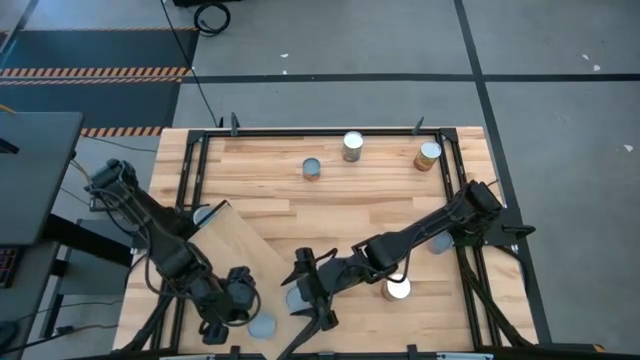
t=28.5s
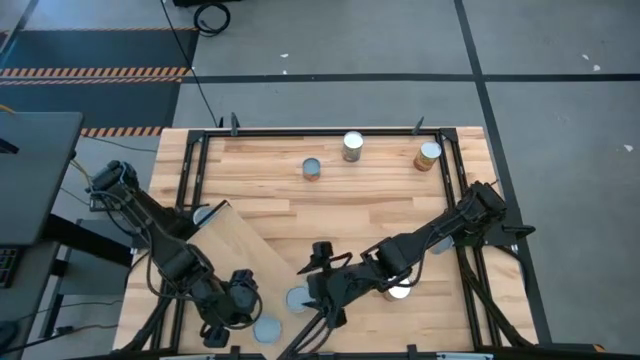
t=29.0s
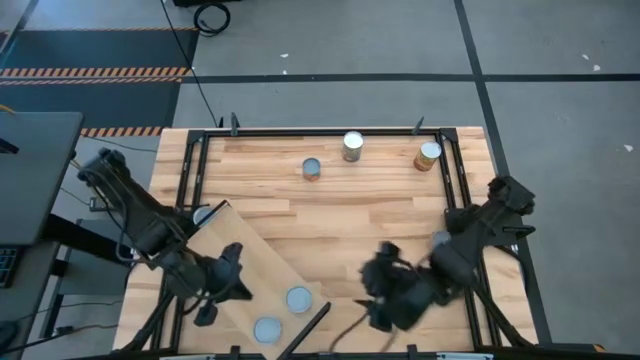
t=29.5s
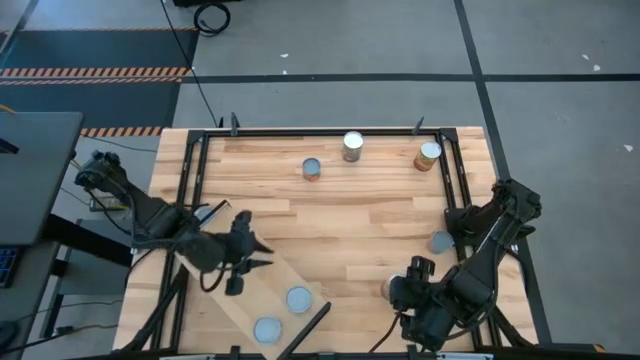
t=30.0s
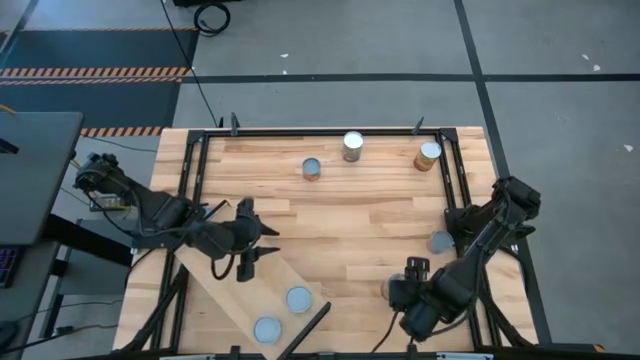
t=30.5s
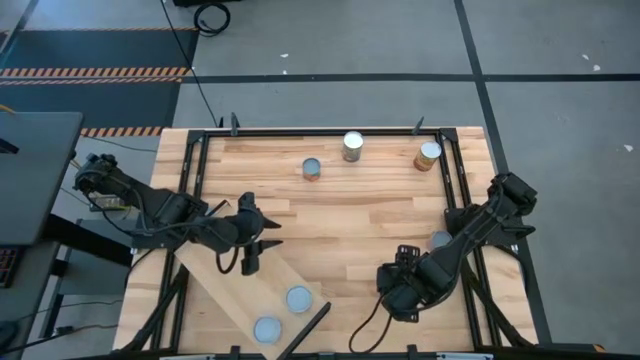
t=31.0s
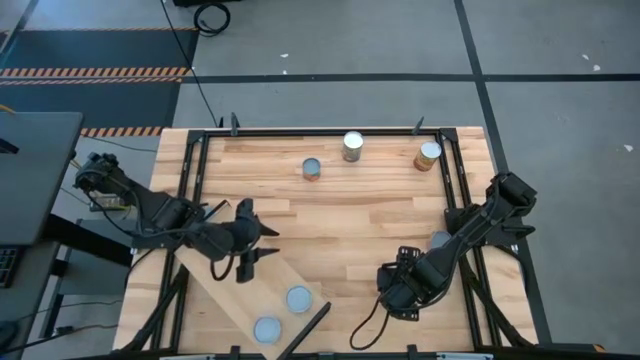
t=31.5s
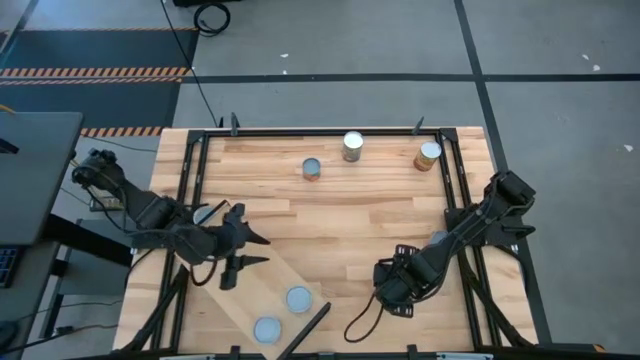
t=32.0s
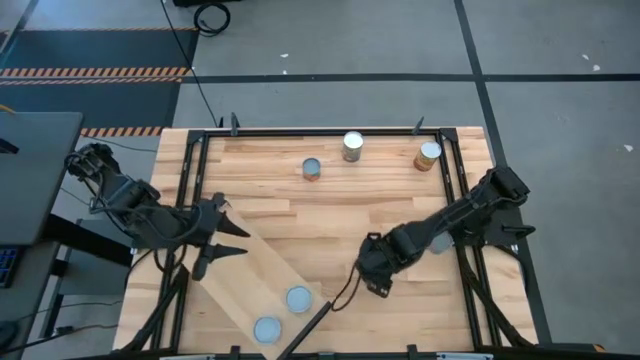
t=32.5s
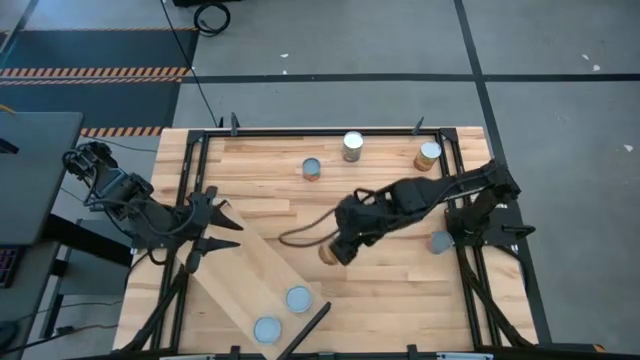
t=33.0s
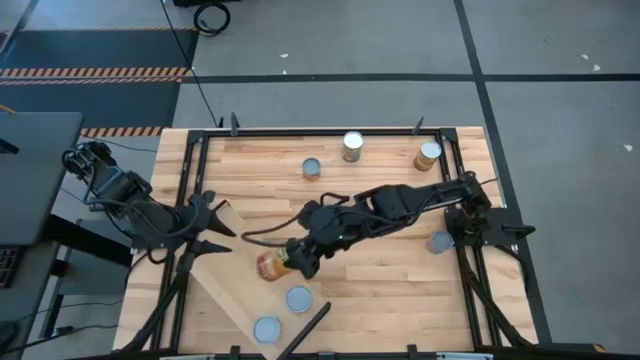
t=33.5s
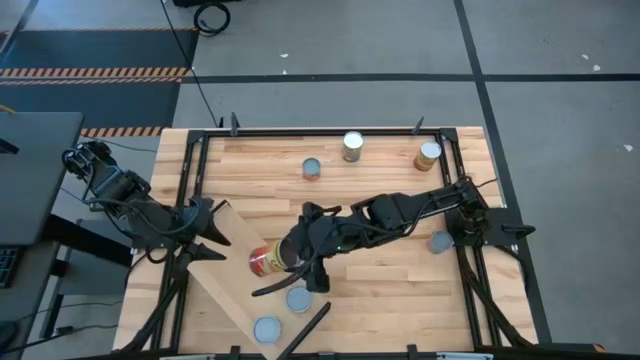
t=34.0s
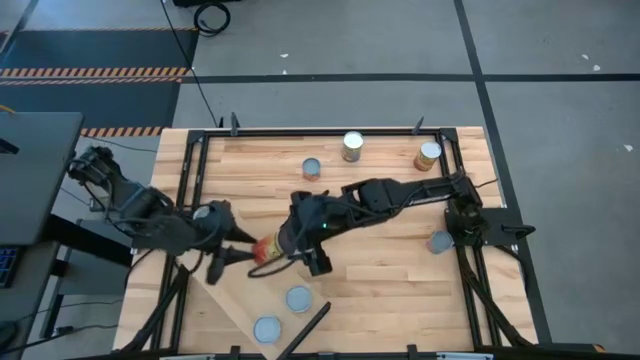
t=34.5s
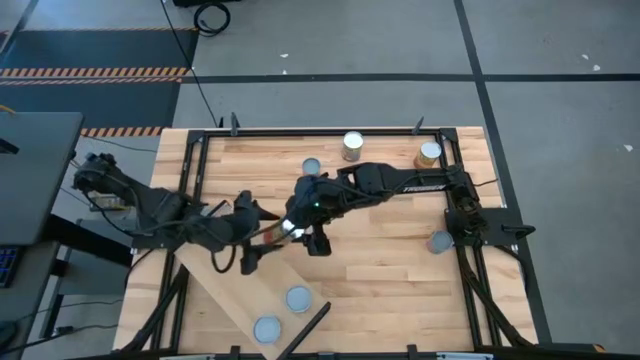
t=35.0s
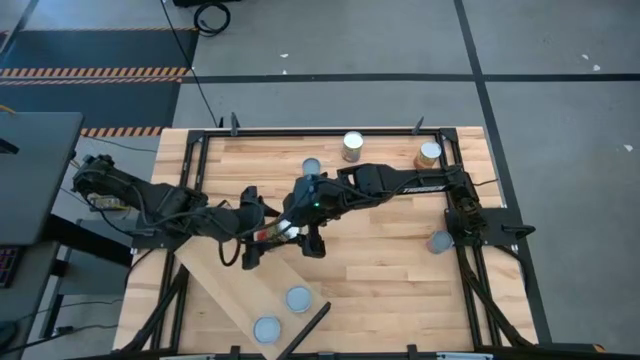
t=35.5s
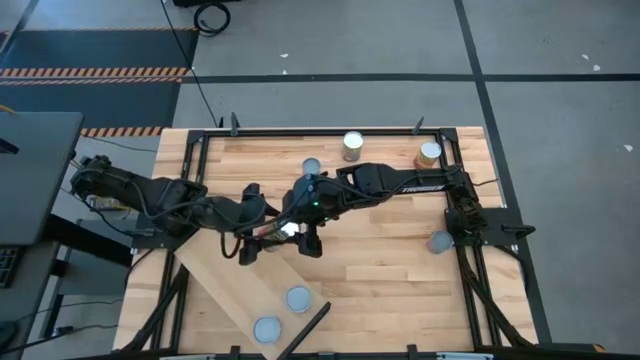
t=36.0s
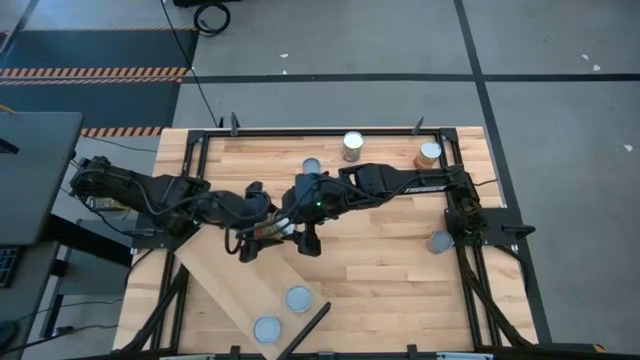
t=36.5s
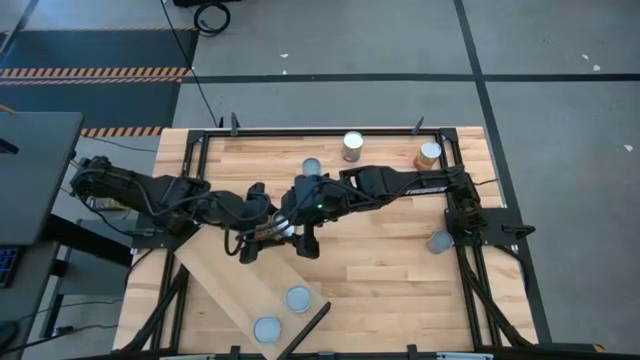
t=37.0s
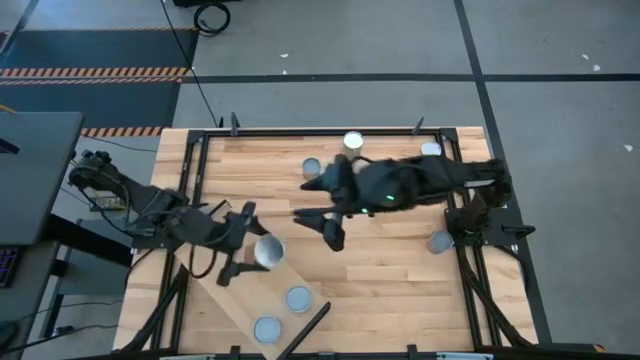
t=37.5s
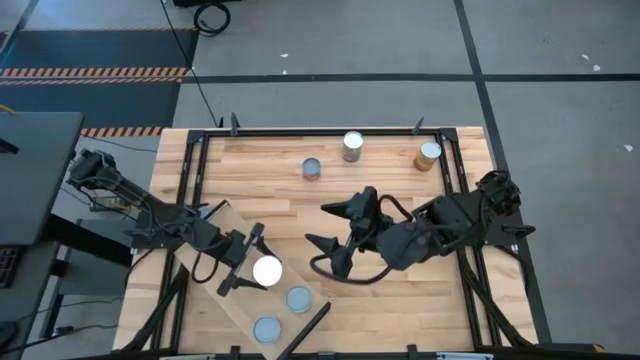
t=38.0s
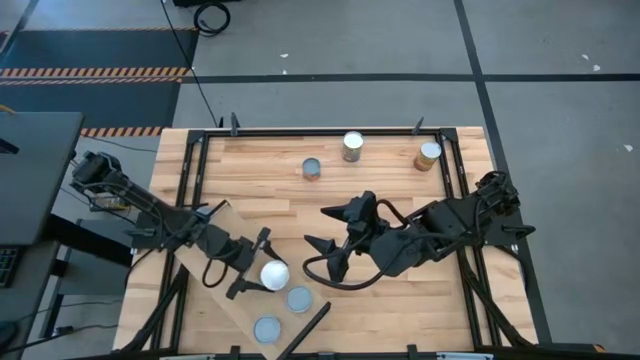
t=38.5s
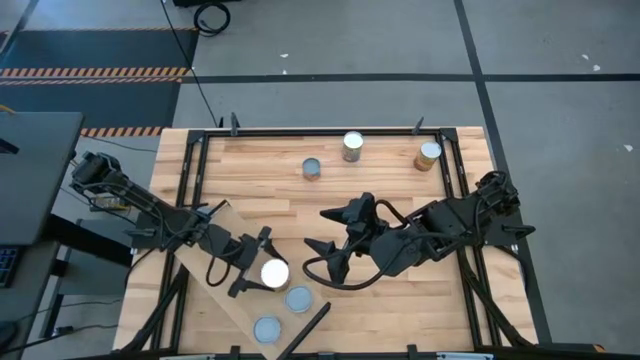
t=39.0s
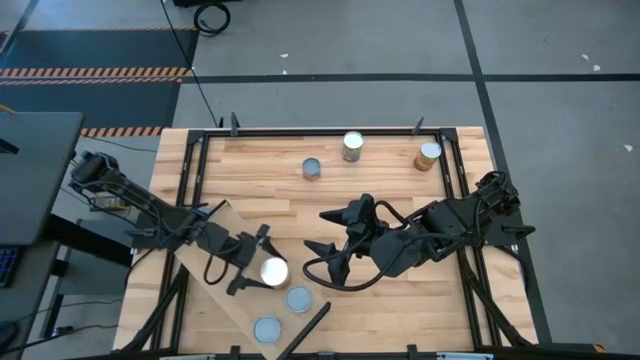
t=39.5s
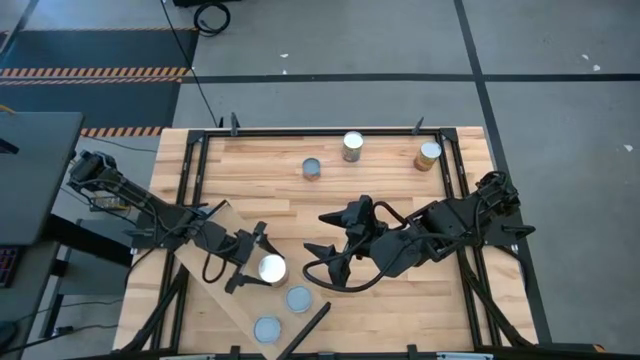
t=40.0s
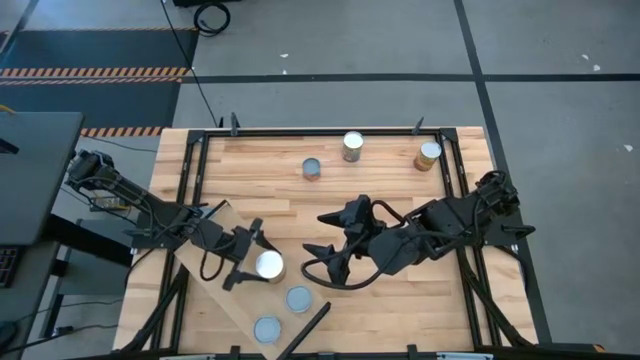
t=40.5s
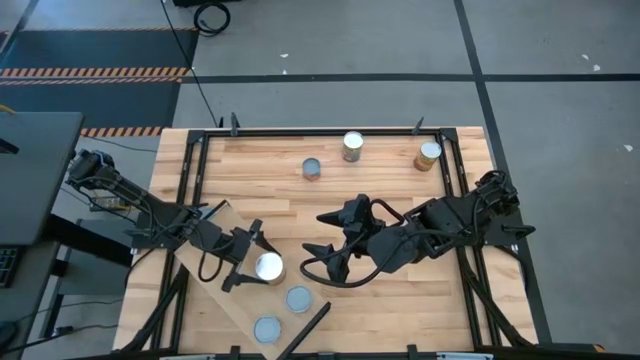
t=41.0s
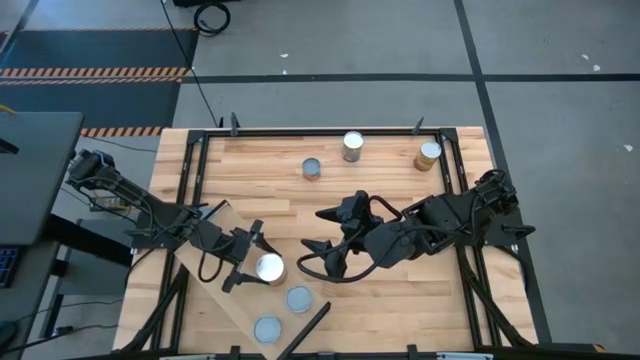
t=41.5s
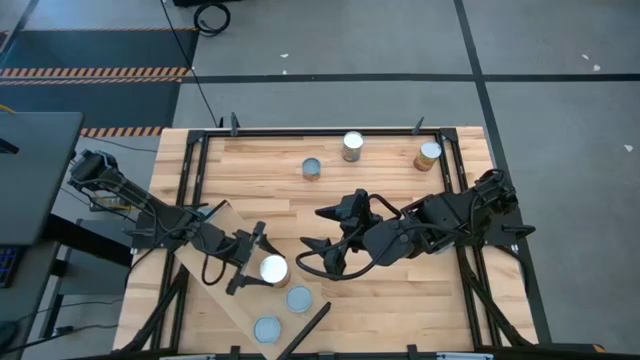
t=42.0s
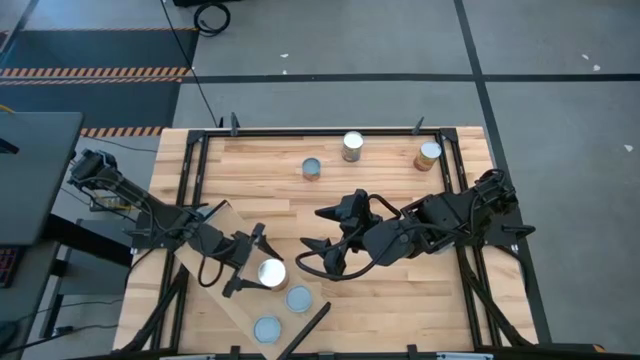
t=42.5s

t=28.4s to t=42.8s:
Task: Pick and place cans onto a shelf
Put the canned corn on the shelf
